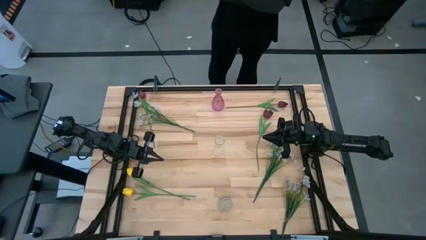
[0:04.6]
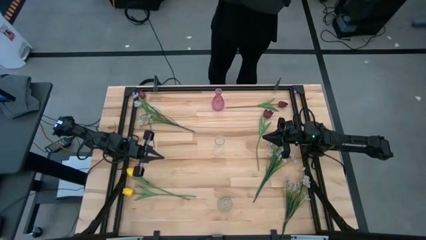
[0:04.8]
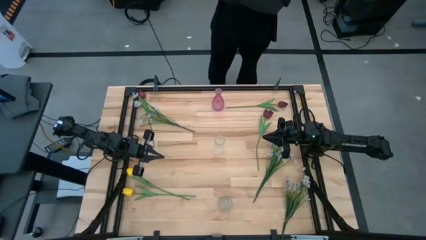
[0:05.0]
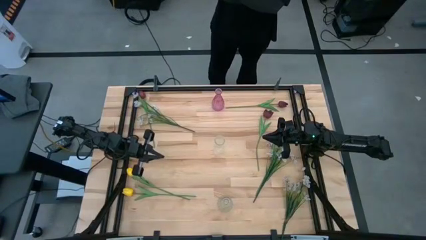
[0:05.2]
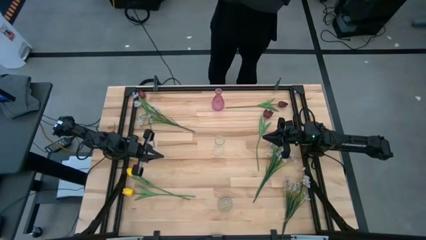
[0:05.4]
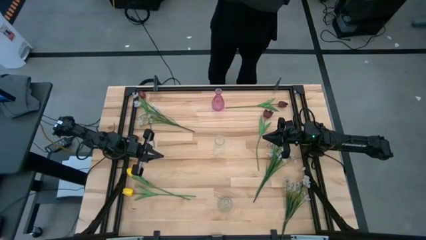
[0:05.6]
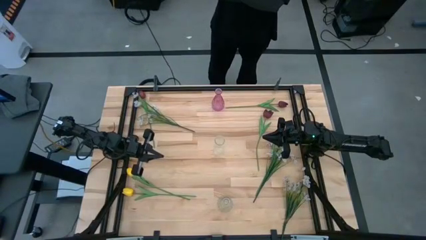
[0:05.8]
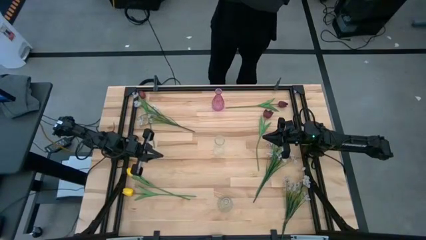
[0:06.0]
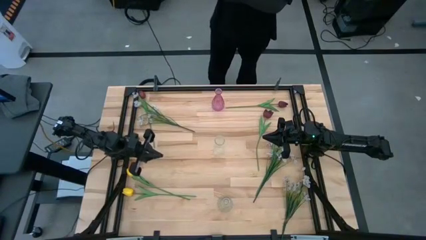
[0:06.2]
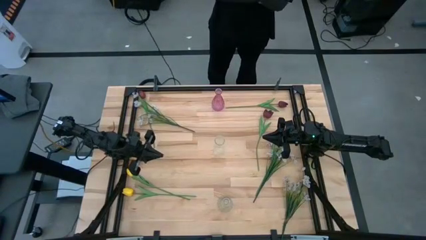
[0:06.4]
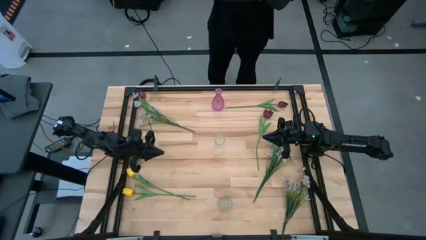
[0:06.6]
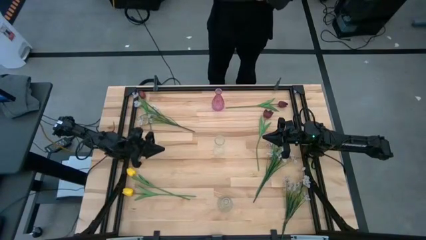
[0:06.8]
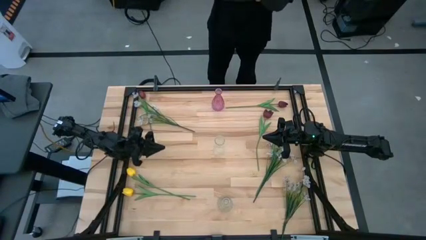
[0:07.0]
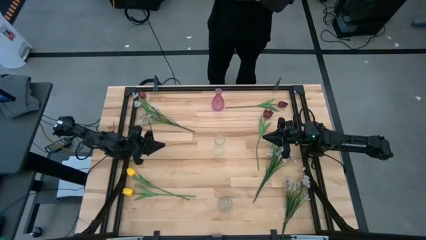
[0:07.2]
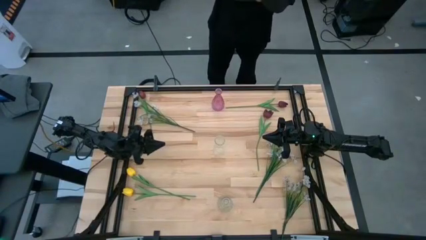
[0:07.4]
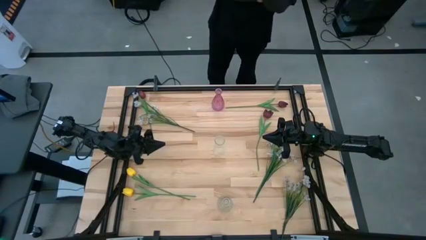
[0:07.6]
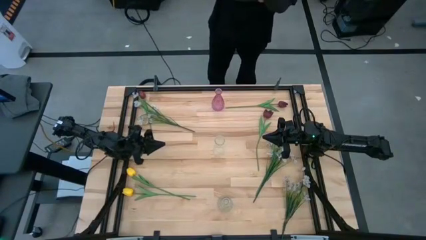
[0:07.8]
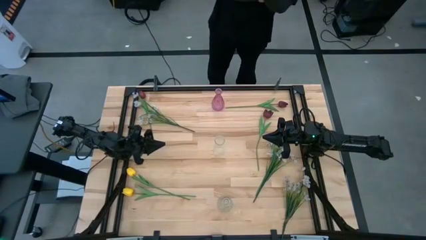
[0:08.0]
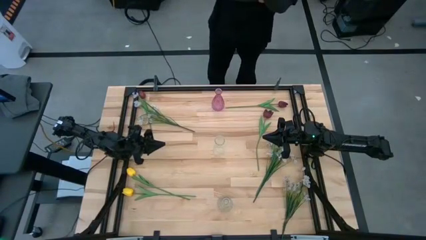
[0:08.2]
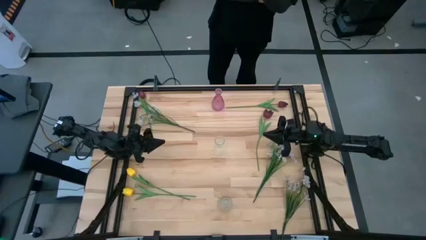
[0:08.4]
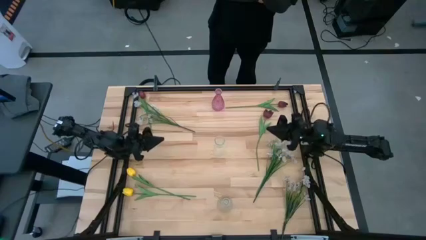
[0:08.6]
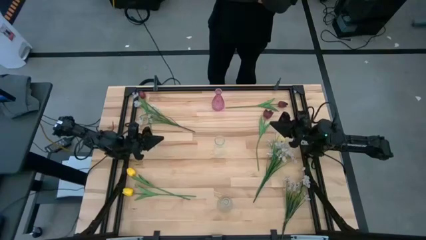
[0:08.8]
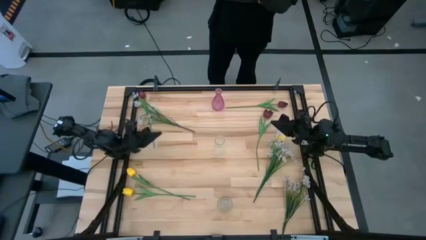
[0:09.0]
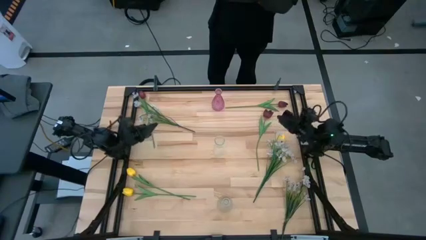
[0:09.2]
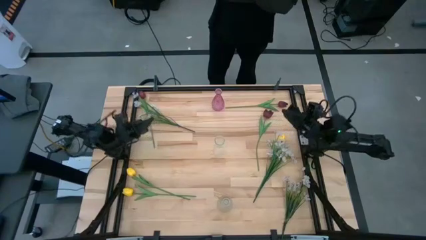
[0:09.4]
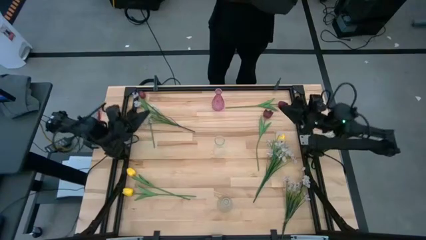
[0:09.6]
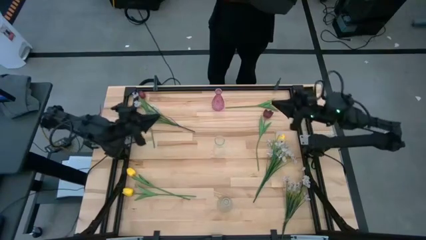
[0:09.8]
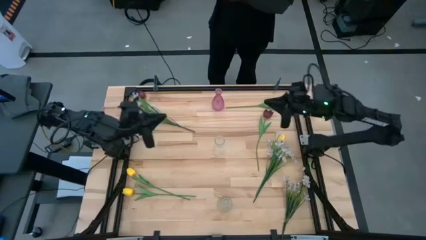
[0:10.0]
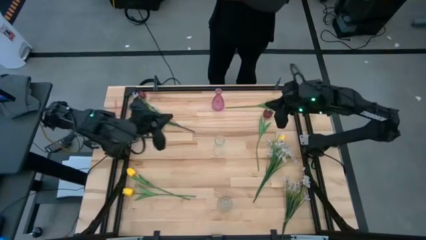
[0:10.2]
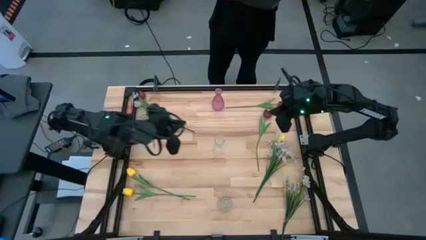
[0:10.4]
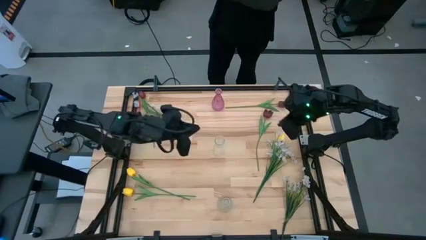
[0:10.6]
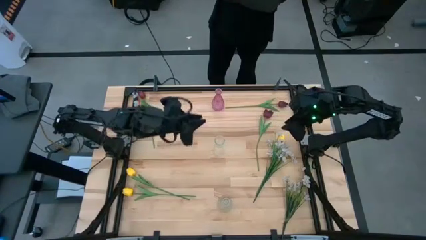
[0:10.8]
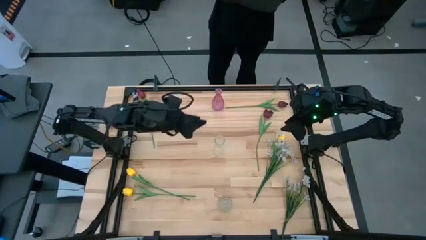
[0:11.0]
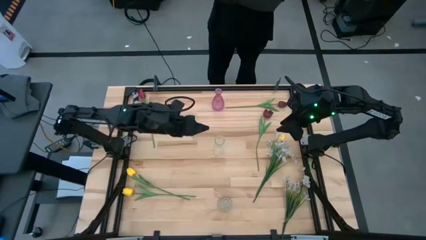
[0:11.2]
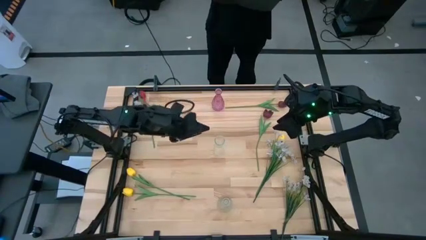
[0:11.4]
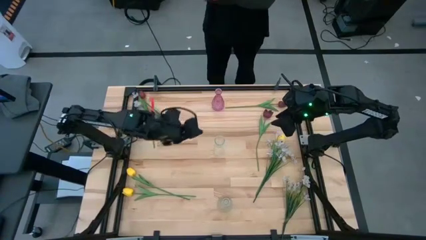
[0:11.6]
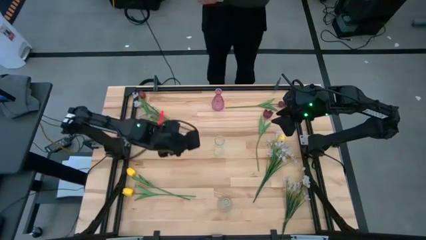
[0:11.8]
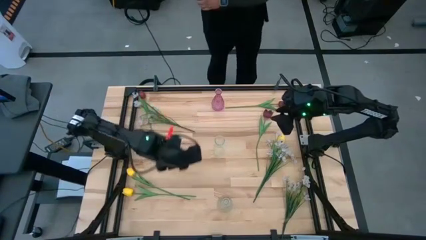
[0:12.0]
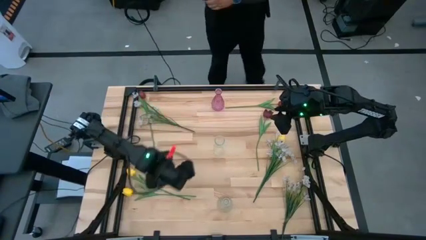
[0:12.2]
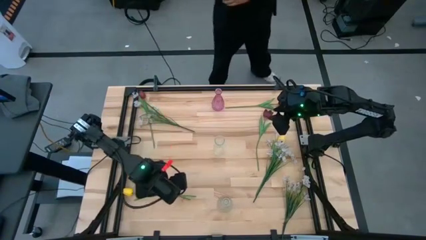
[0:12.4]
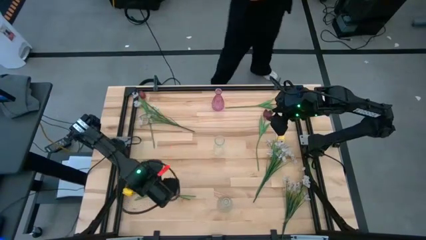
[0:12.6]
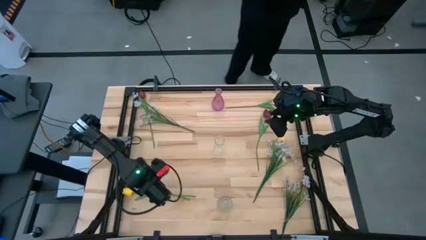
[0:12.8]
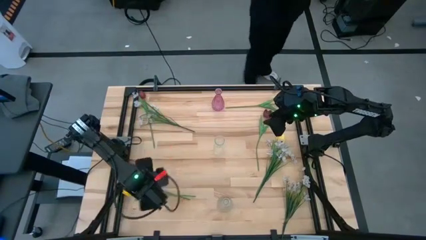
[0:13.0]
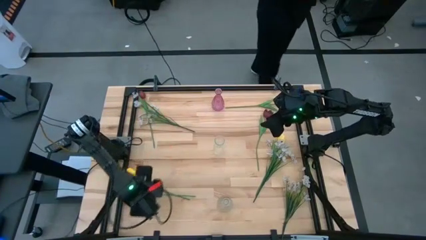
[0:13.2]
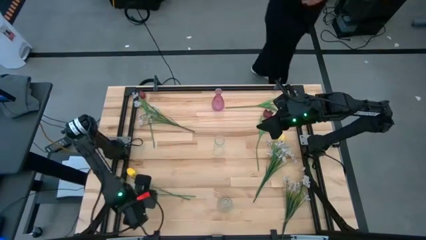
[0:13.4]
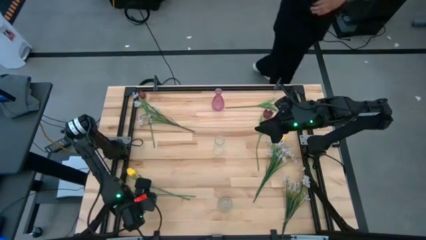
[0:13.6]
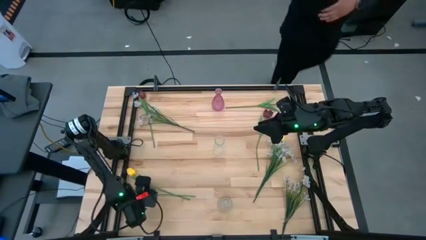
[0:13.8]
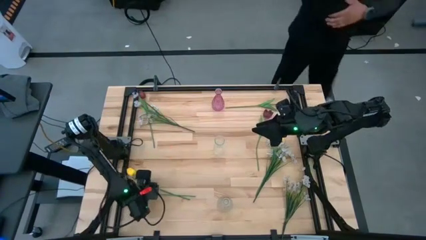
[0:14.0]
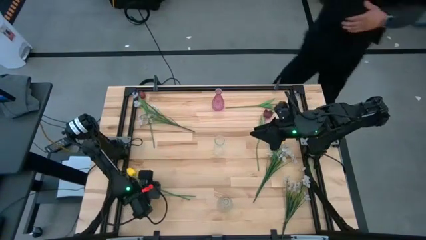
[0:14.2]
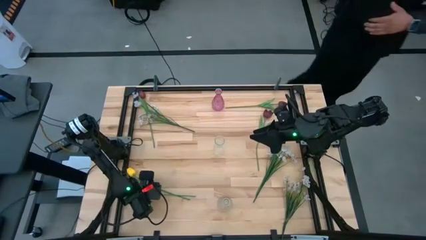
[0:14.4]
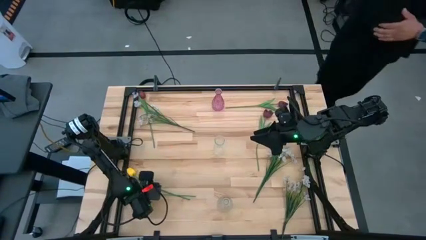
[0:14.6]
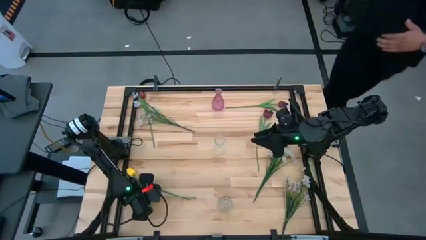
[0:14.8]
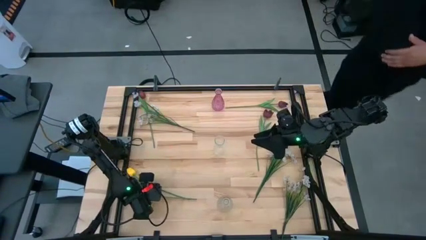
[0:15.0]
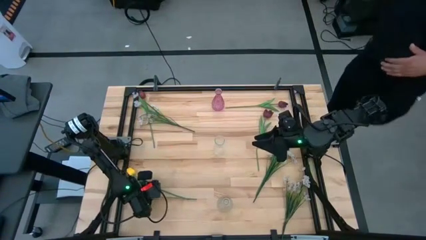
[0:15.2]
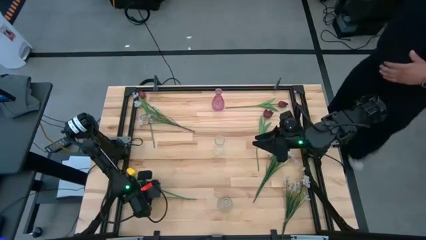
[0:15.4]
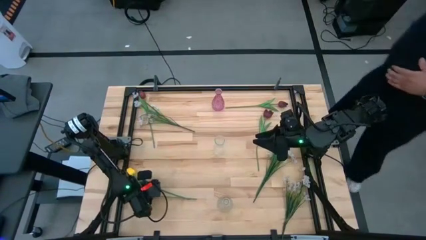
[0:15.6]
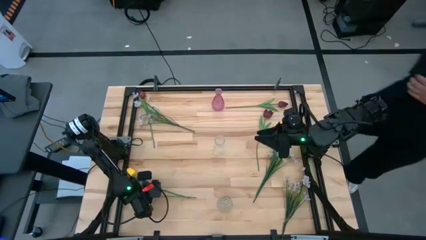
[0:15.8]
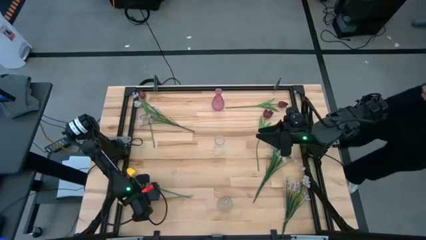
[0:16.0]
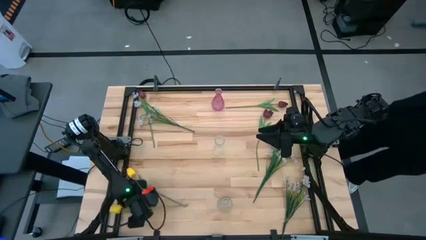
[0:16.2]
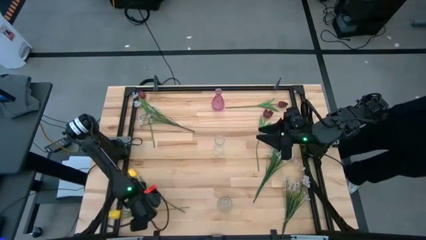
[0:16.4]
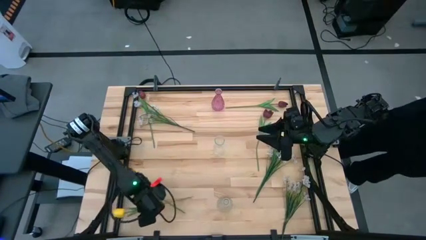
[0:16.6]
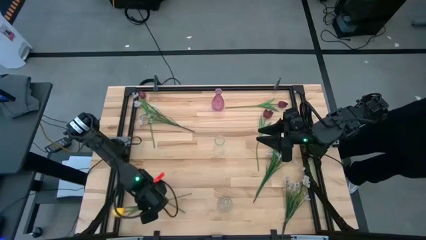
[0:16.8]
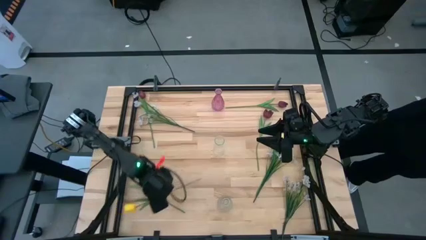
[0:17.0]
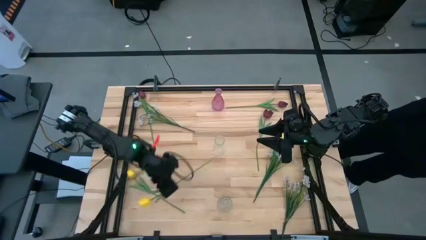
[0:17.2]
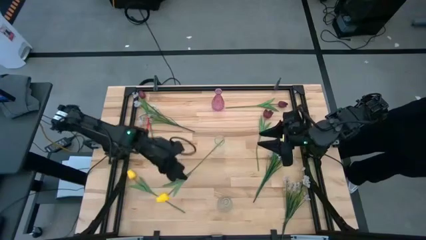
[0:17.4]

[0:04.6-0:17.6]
Task: Sort flowers into vase by color
Put the bottom yellow flower into the pink transparent vase

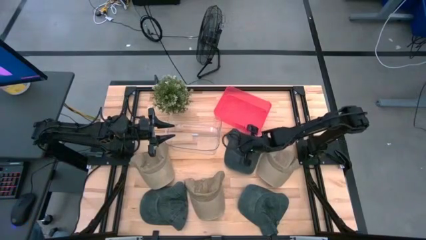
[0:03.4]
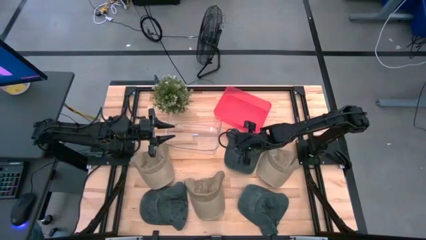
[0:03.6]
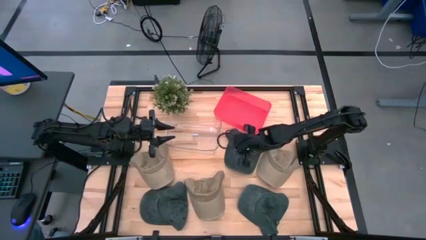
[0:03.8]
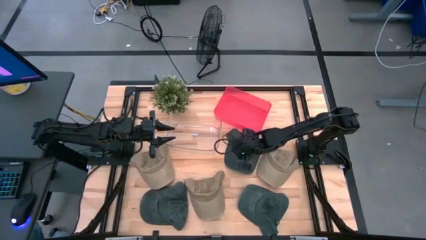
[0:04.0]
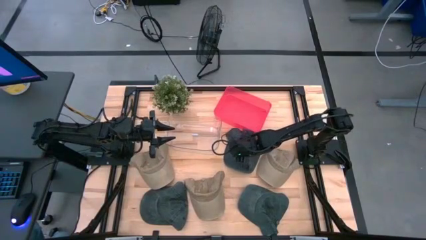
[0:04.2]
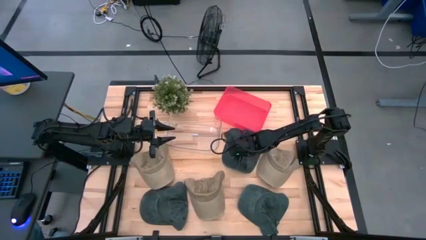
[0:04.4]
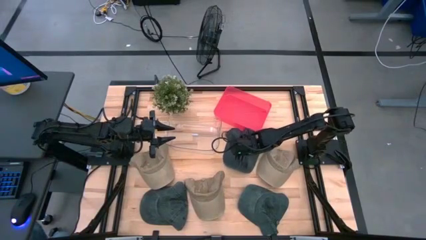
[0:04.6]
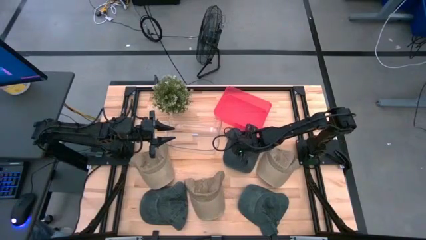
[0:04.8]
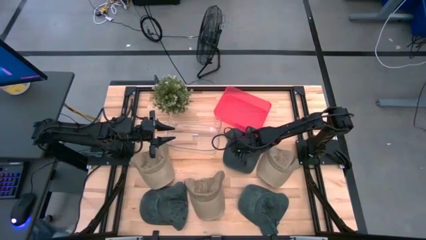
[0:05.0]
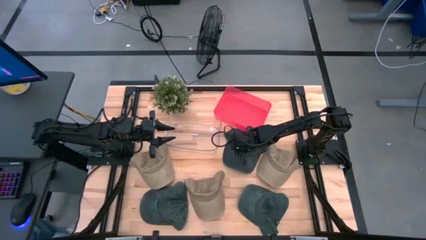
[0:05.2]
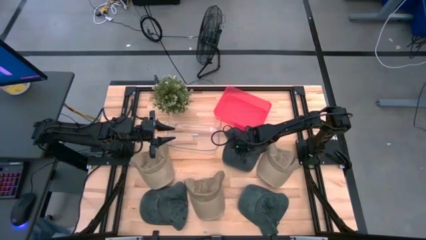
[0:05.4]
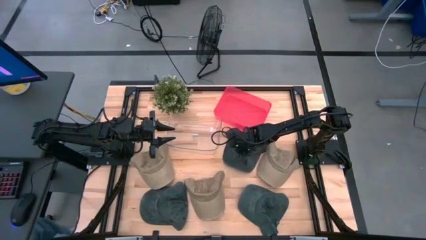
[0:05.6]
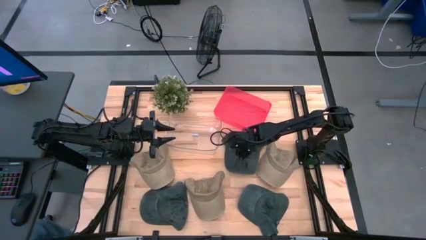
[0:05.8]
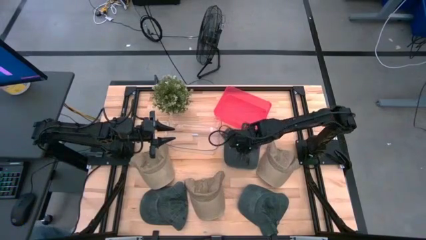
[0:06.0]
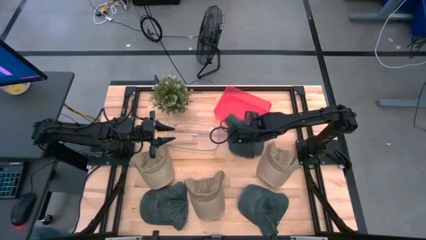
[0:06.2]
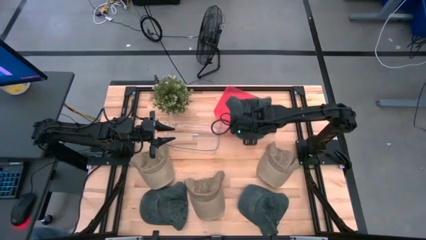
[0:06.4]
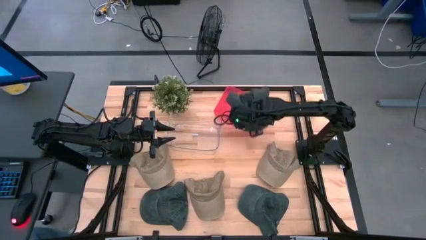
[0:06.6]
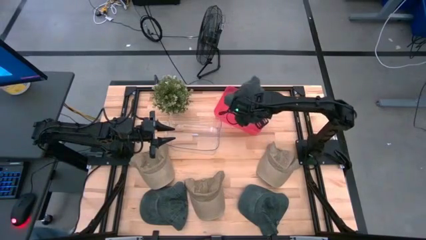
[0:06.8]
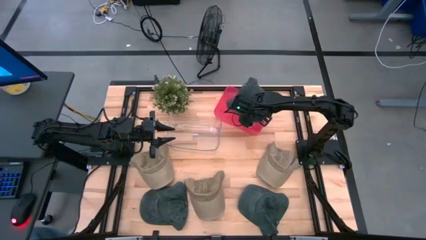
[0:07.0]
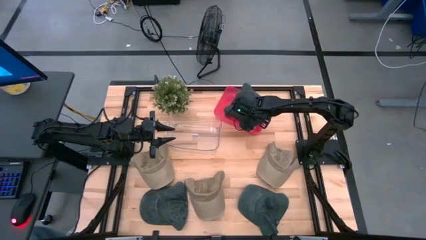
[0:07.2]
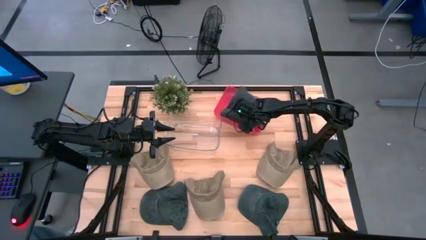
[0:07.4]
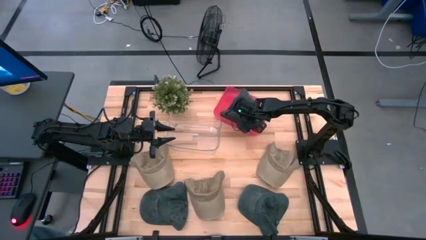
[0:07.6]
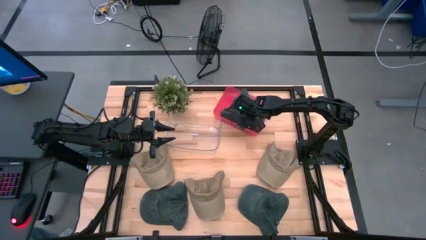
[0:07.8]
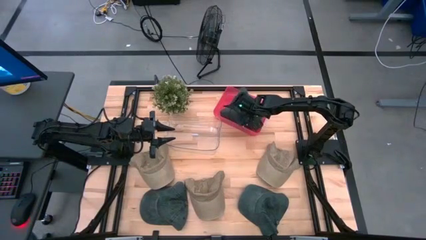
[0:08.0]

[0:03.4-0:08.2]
Task: Pick & Place hat
Put the top black cap into the red bin
